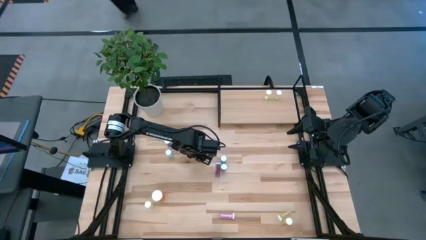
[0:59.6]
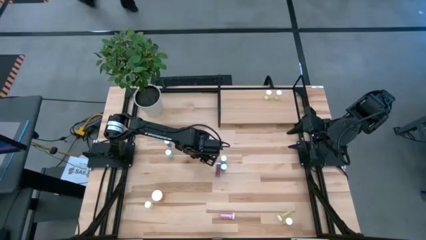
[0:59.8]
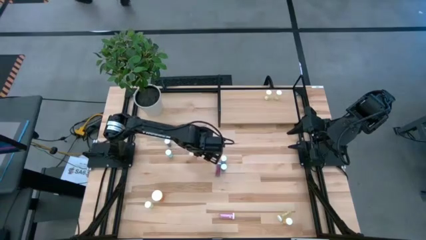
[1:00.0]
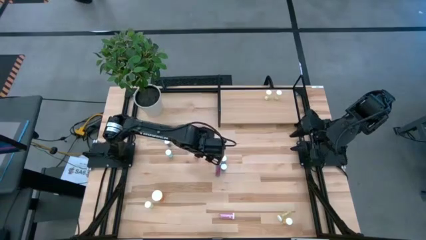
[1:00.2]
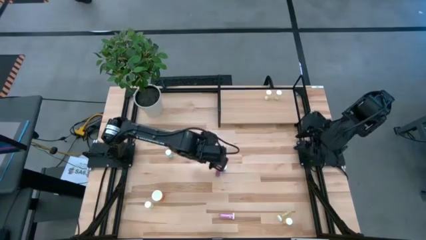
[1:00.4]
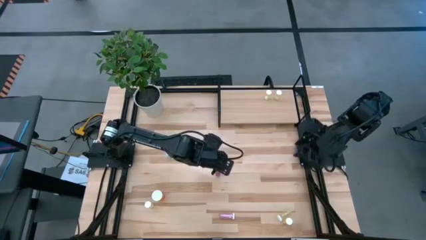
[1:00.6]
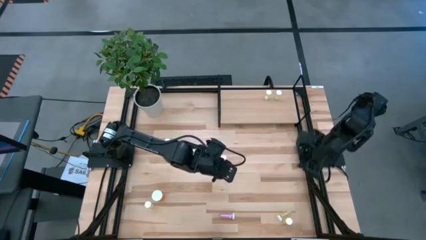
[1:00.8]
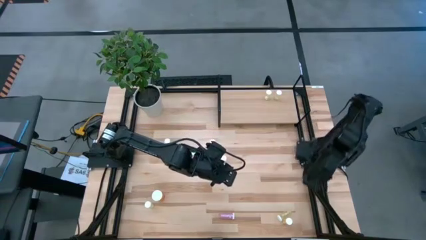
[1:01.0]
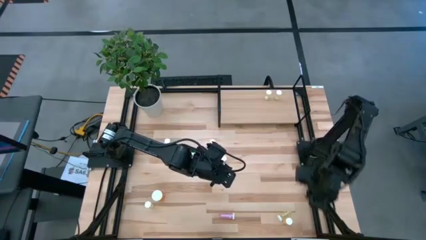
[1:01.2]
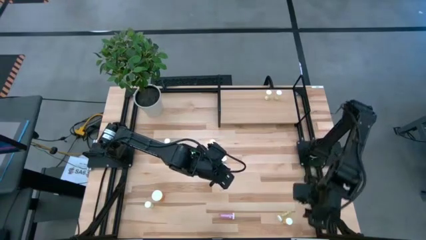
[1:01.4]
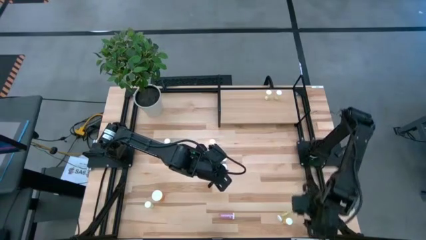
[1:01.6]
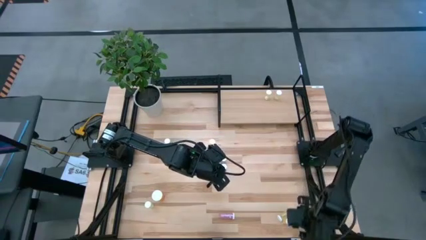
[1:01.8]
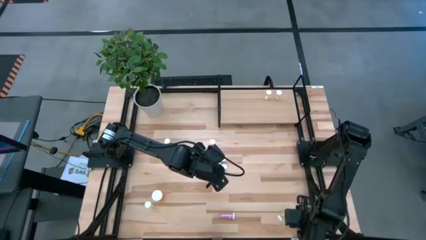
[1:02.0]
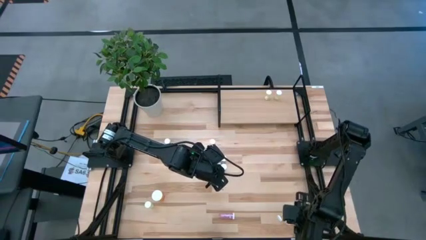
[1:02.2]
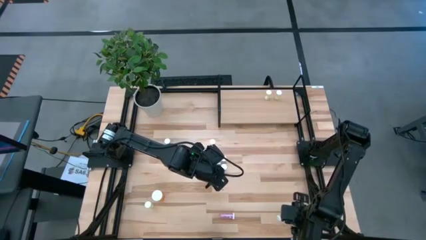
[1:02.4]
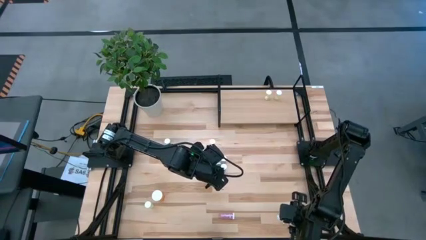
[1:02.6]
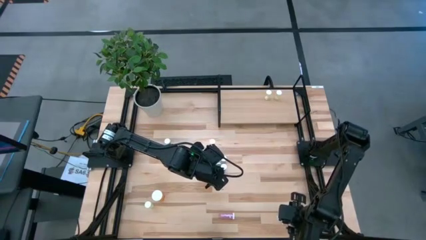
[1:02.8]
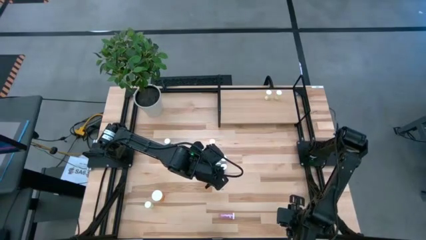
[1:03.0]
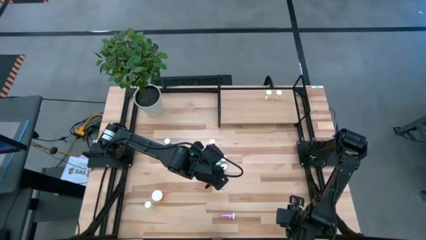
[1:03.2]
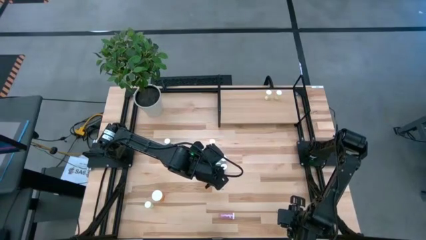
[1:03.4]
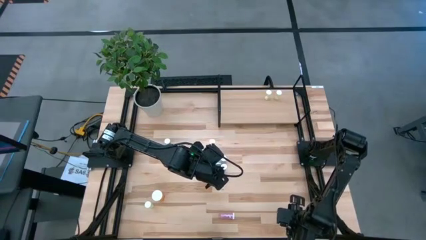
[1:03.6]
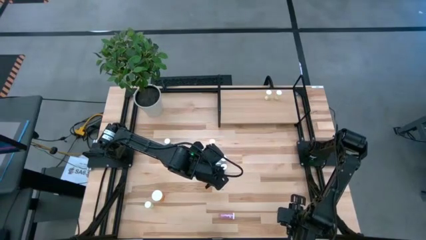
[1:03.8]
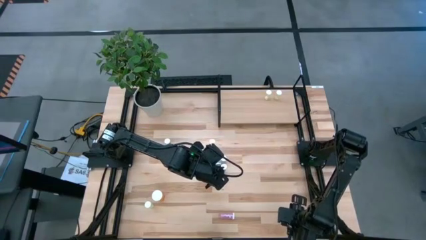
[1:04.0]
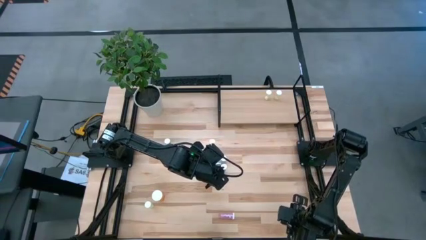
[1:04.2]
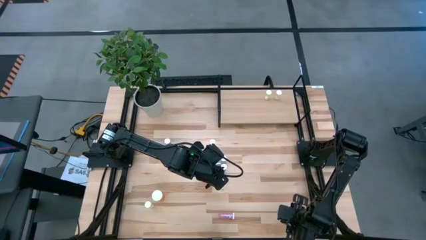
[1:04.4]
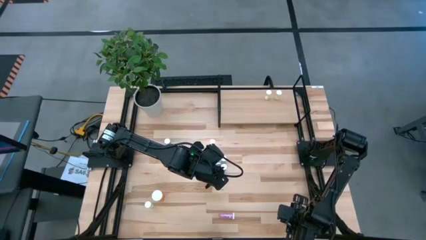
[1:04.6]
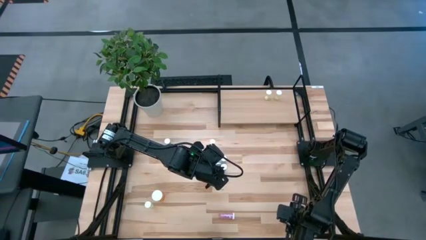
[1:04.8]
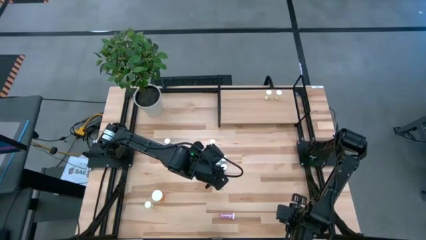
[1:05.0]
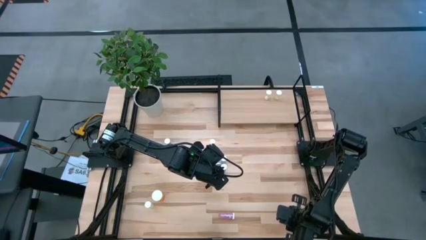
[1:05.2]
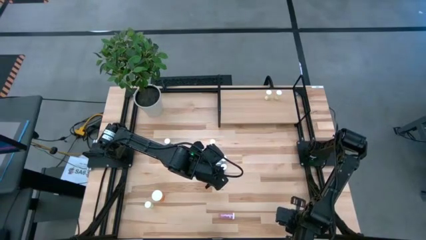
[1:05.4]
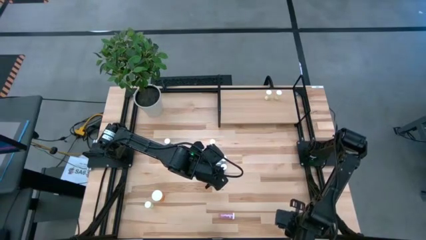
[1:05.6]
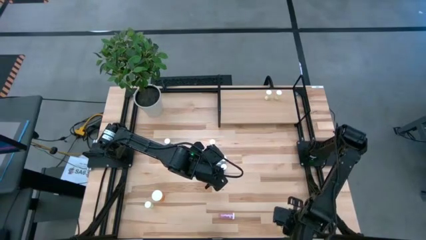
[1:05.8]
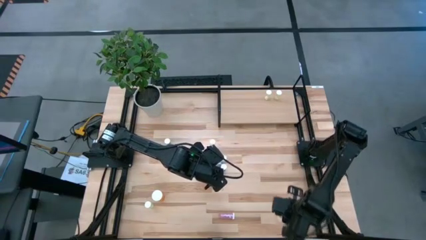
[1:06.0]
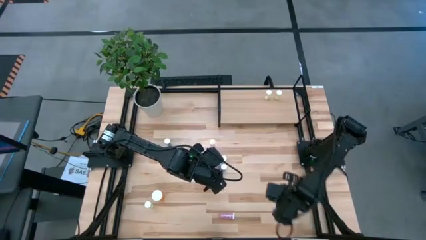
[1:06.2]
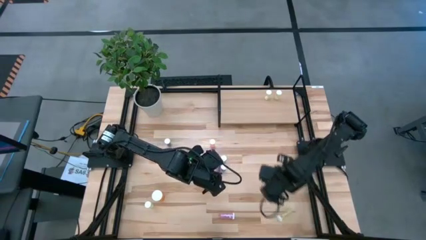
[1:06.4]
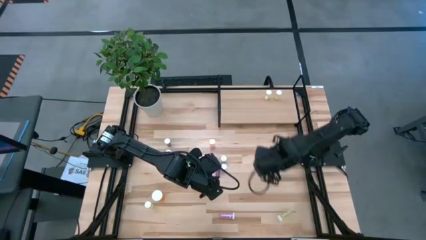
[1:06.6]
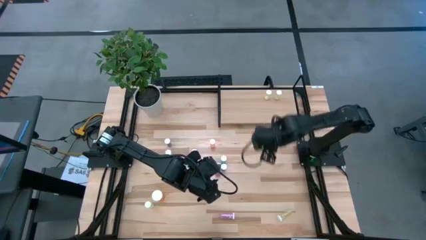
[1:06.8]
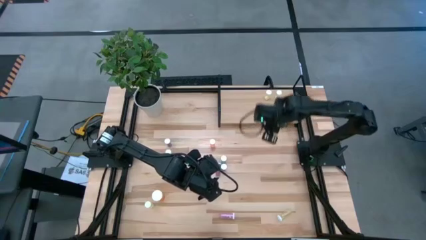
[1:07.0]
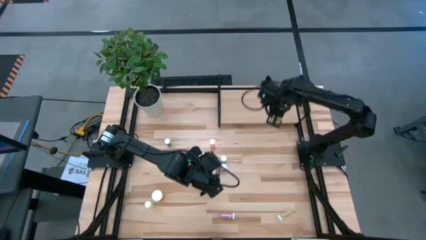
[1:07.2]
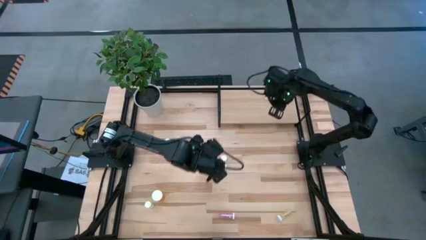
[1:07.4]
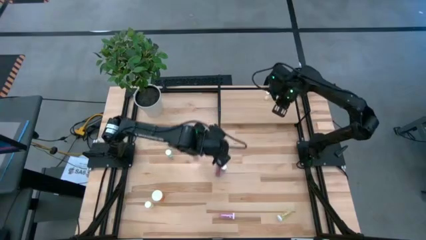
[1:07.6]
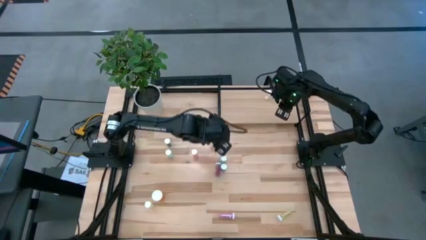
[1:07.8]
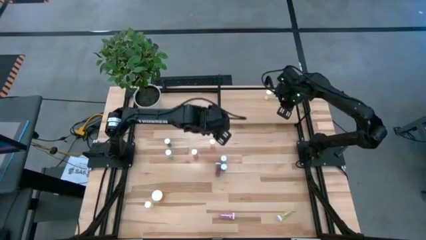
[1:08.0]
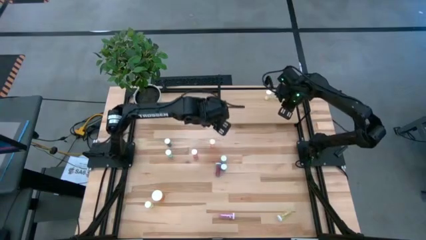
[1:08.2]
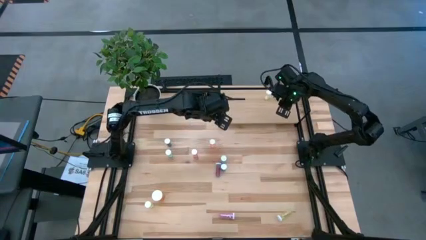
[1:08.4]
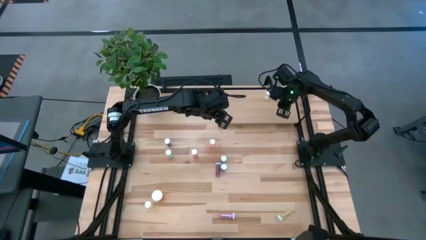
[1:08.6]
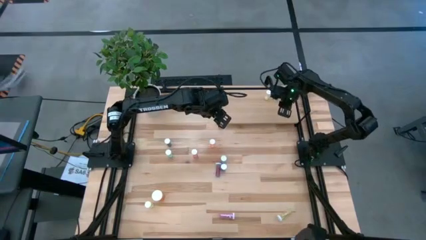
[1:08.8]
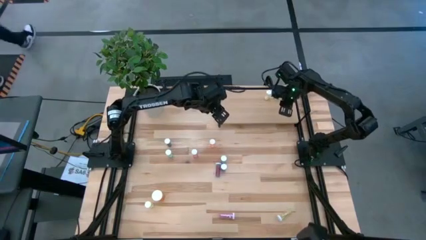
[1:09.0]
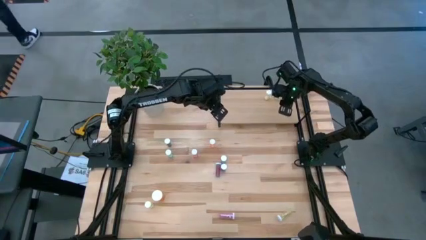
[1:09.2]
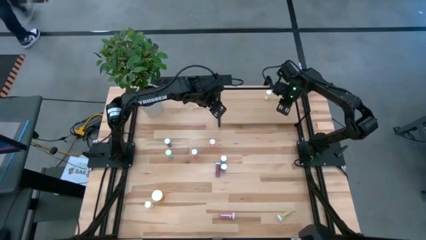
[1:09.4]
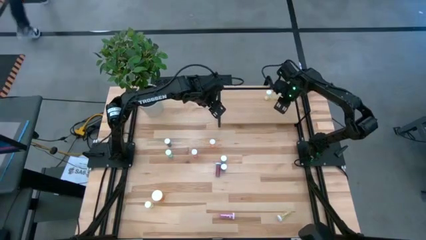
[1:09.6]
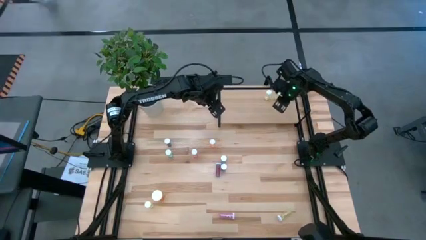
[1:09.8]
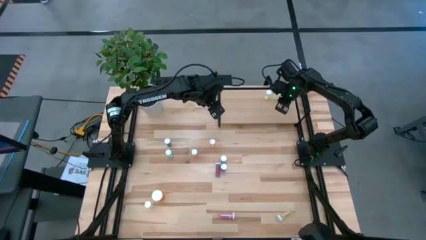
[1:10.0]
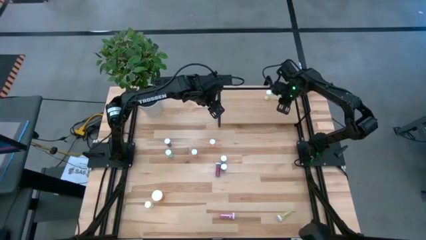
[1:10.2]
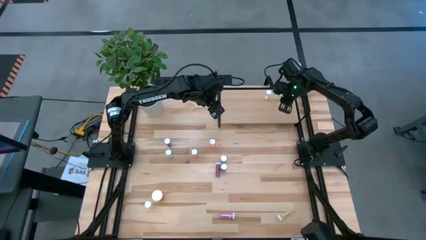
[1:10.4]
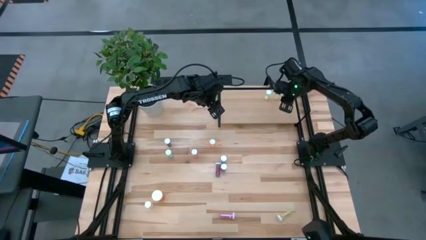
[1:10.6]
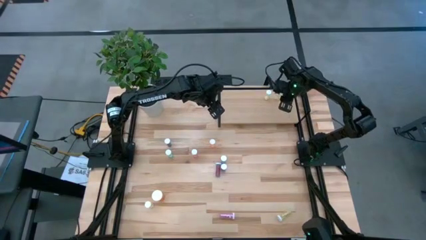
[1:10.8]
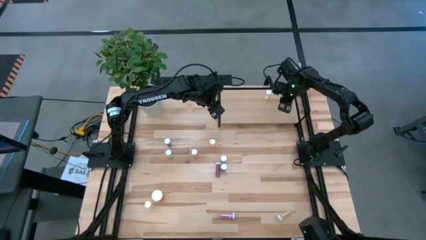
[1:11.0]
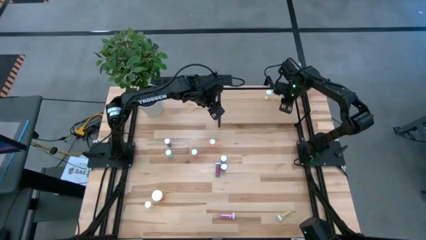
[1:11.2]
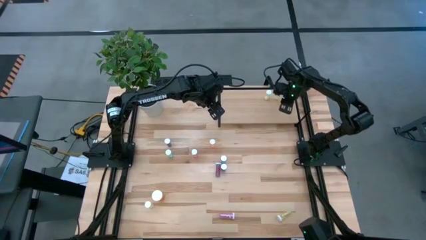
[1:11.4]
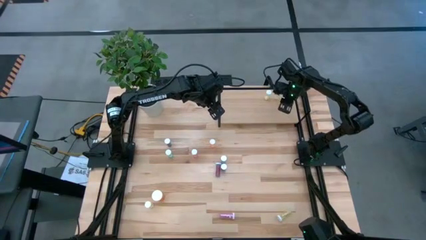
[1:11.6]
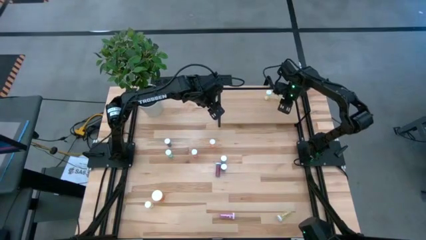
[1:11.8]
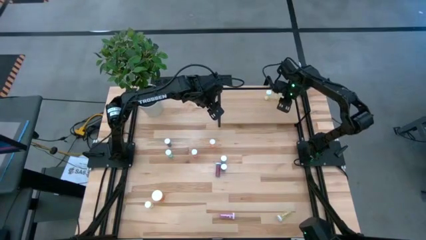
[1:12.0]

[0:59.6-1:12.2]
Task: Pick and place medicine bottles onto shelf by color
Put the yellow pill bottle on the shelf
